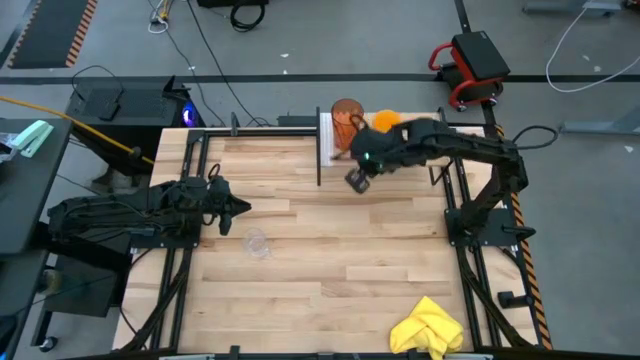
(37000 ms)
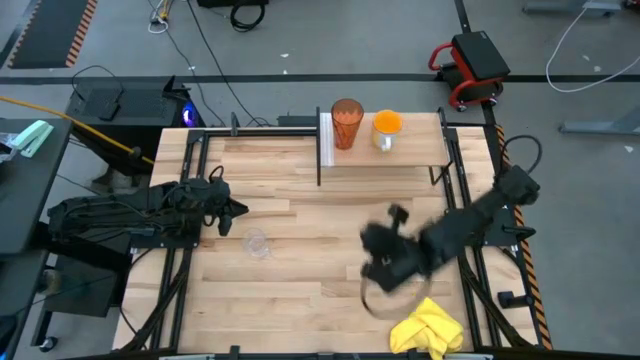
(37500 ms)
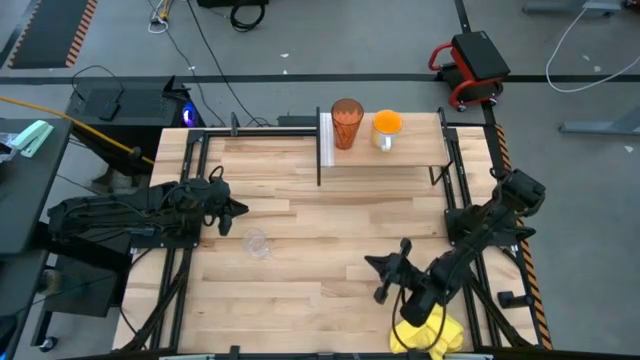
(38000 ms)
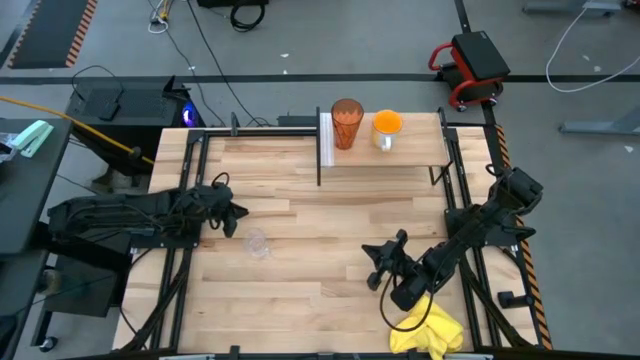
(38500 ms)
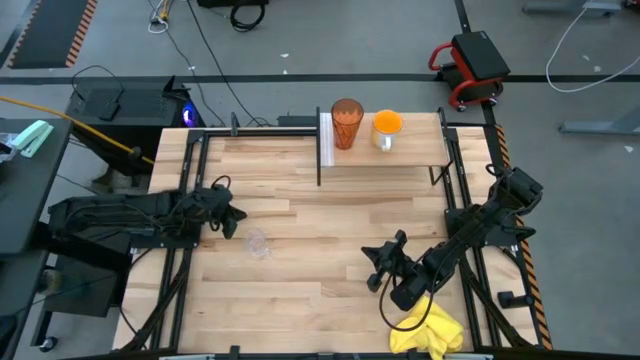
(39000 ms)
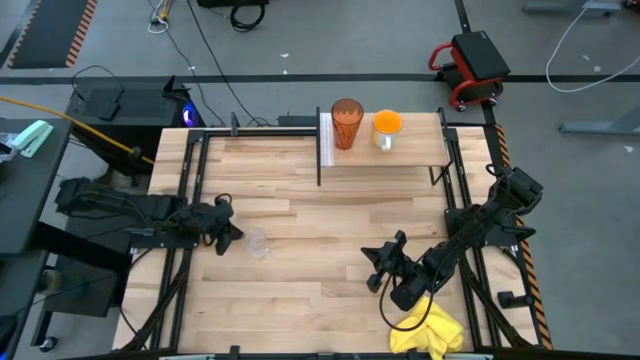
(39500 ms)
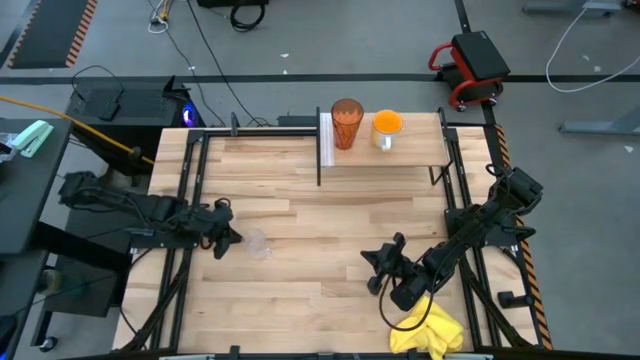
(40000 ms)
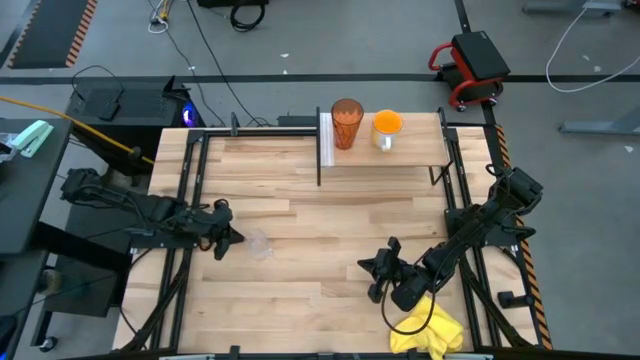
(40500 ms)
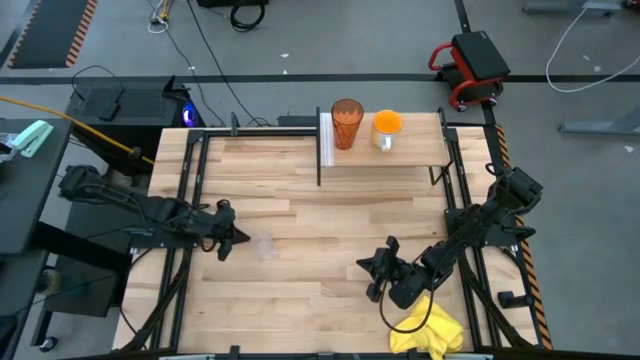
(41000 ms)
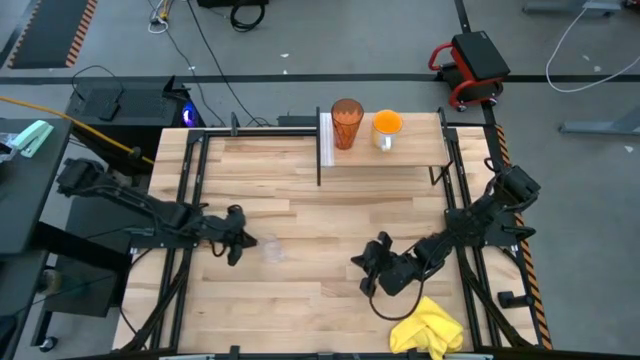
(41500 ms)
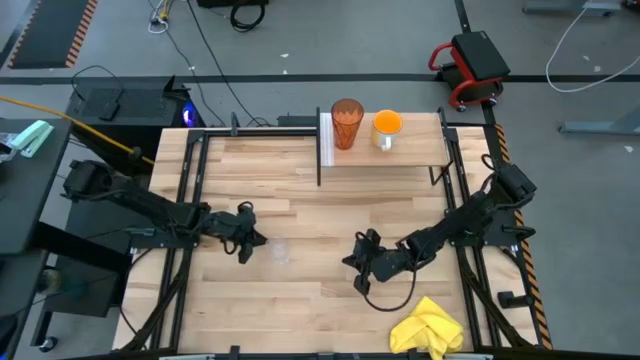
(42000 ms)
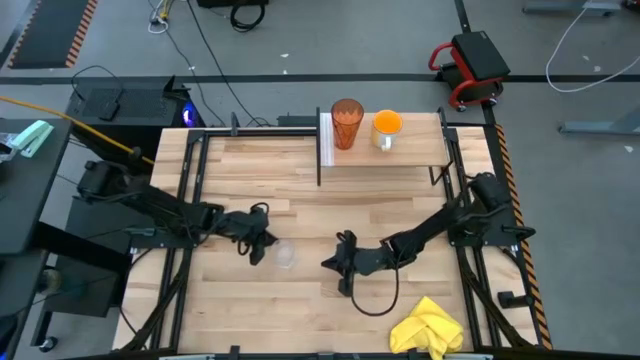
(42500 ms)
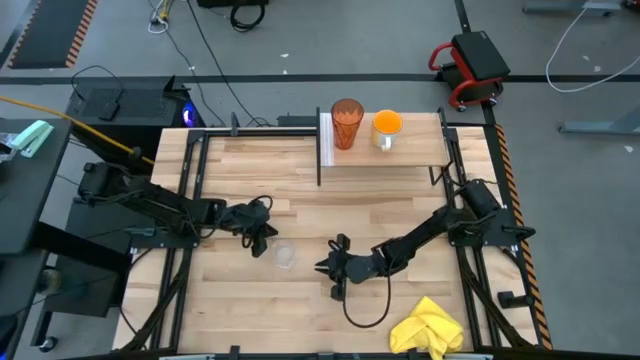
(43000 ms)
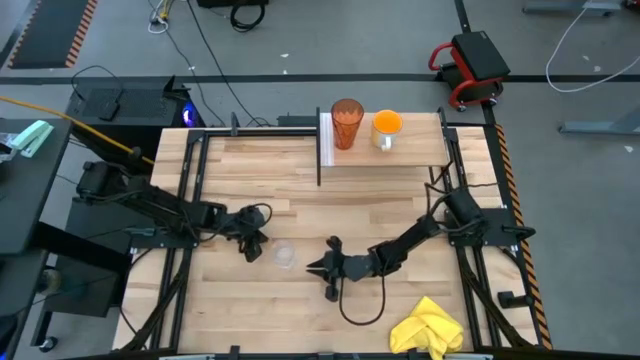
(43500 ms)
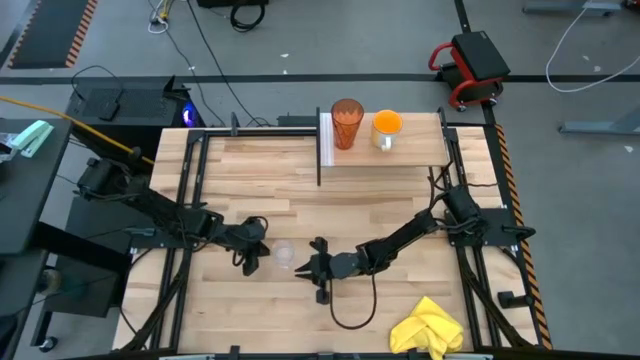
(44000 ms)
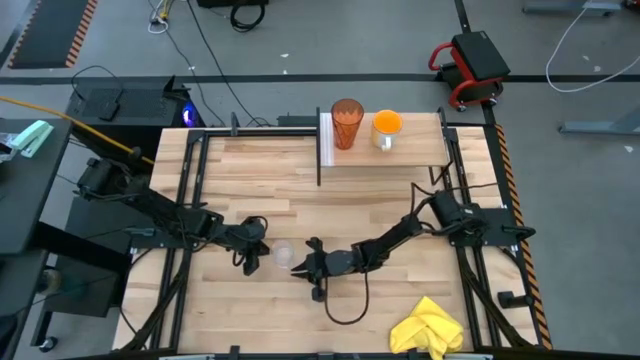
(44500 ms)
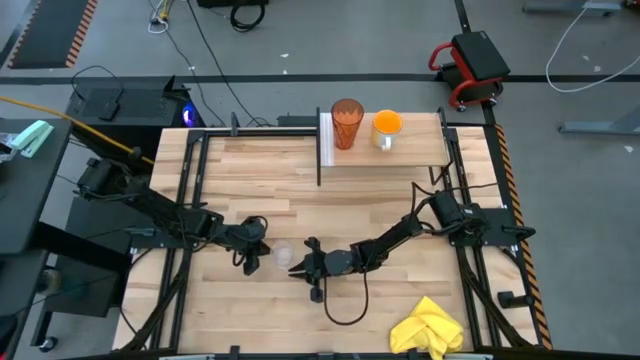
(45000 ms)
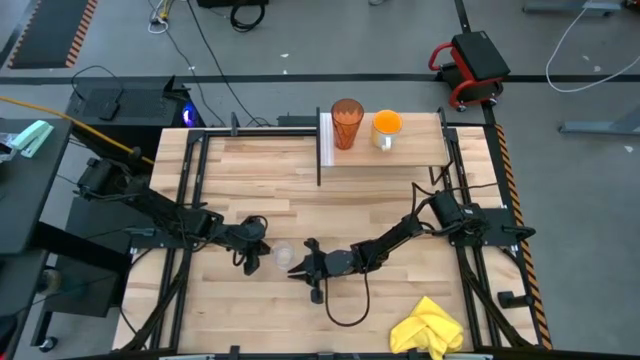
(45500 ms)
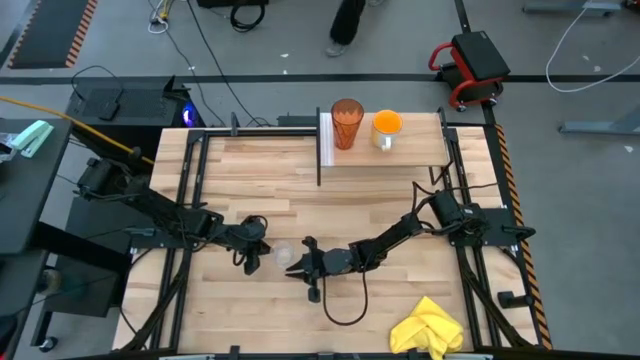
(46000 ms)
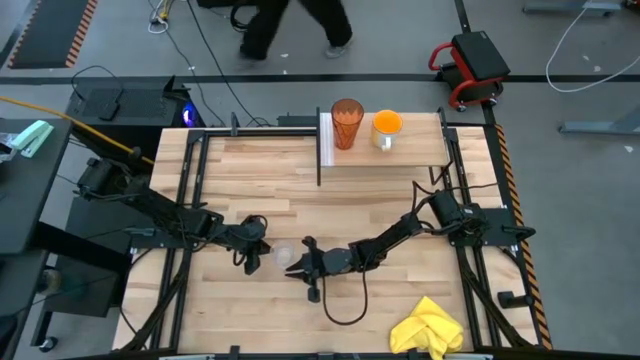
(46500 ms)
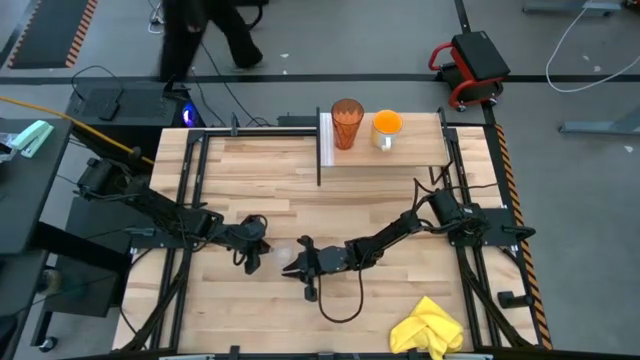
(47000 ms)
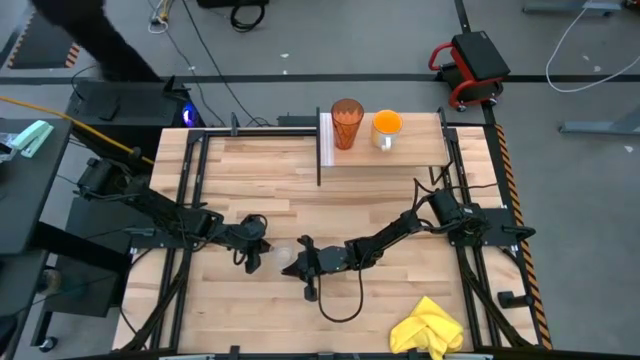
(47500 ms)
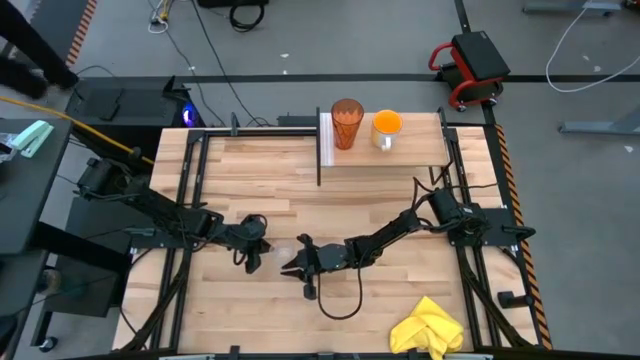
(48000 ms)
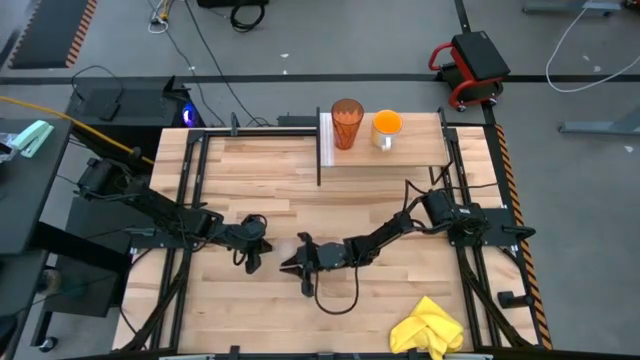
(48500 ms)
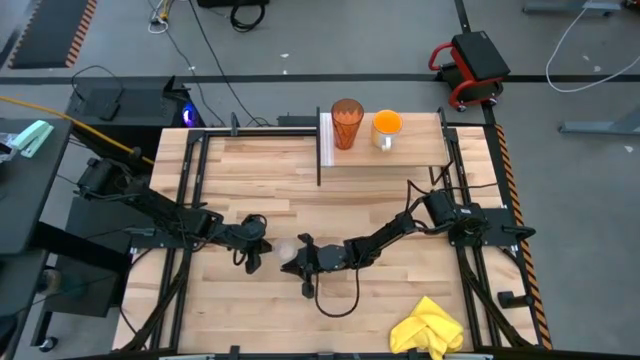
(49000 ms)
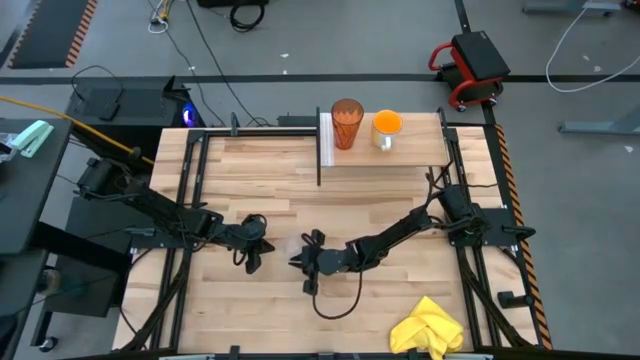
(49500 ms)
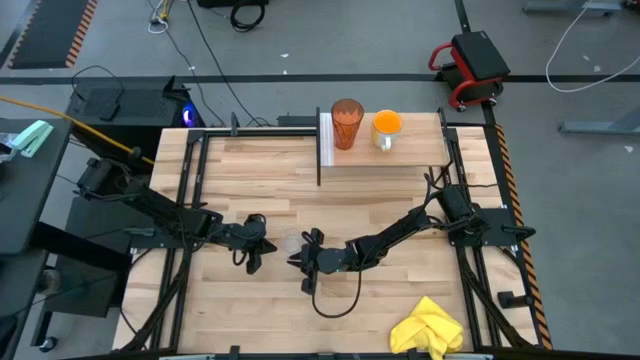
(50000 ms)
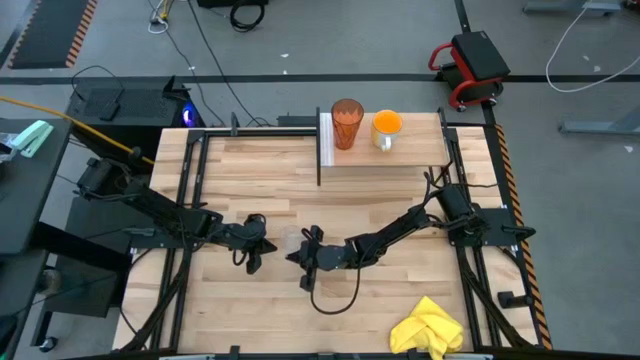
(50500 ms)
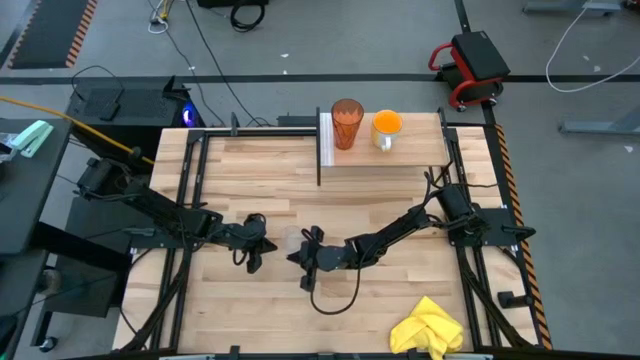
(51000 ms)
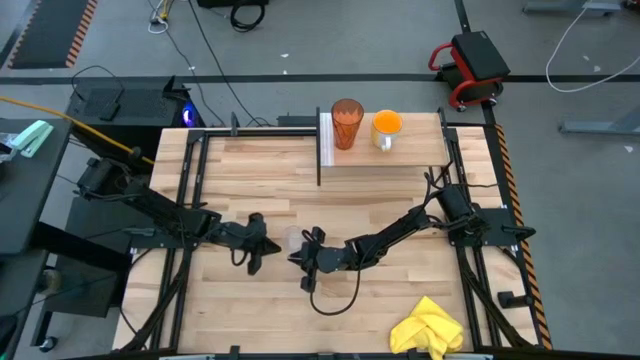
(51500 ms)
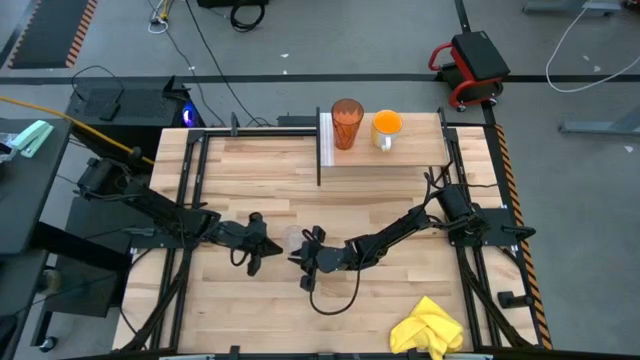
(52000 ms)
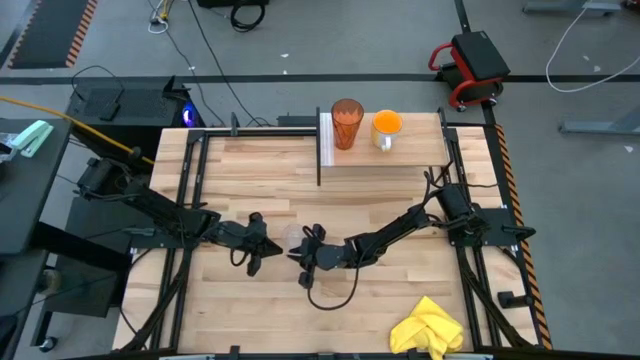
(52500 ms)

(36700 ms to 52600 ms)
Task: Stack small to large cups/mugs on shelf
Put the transparent mug on the shelf

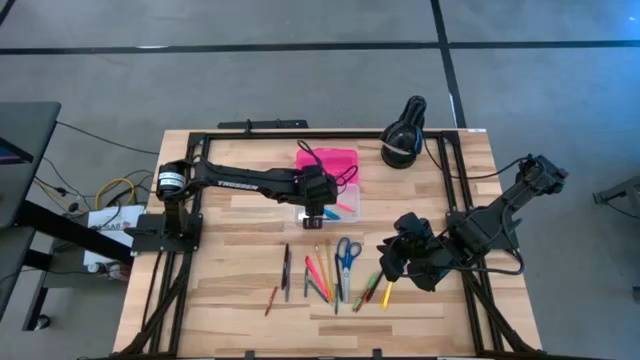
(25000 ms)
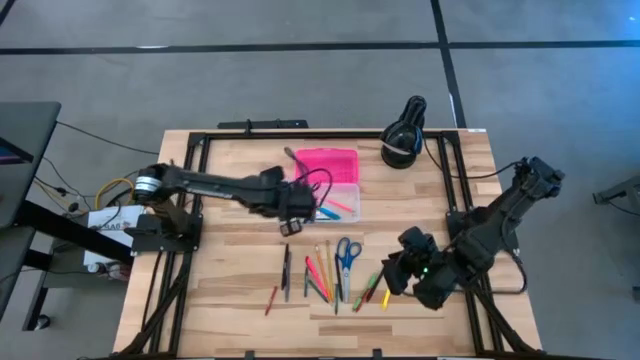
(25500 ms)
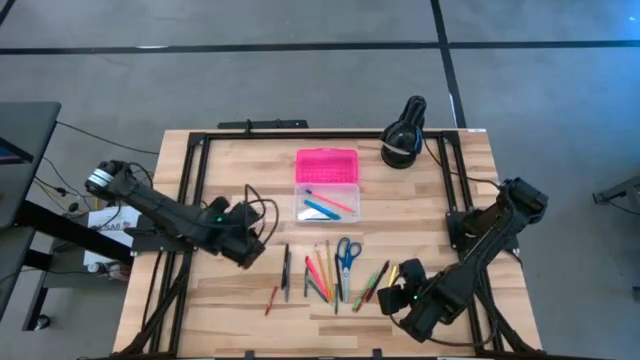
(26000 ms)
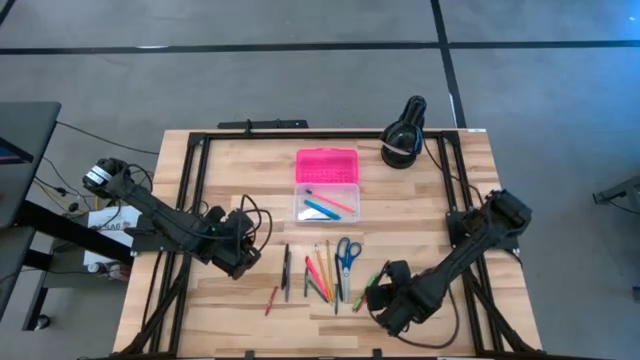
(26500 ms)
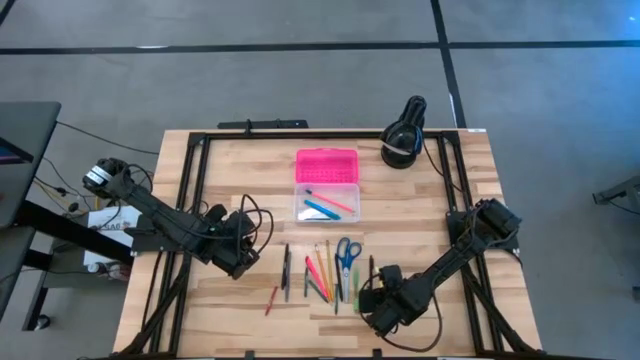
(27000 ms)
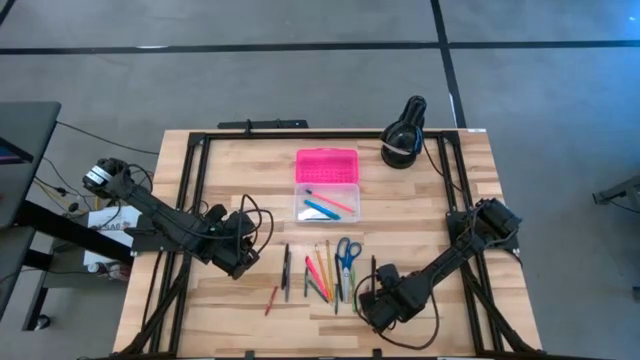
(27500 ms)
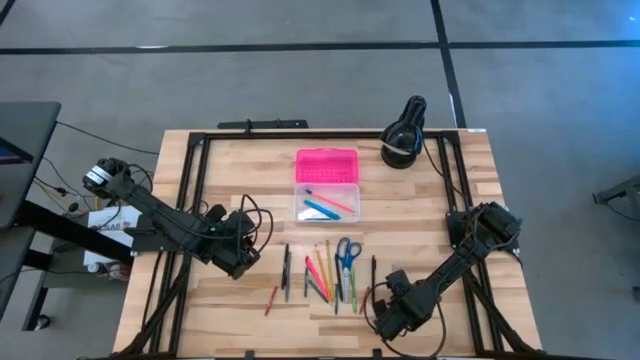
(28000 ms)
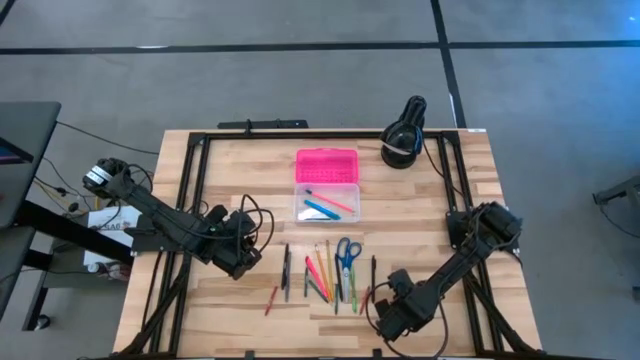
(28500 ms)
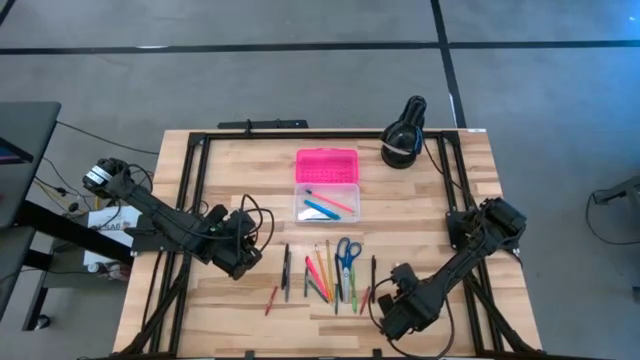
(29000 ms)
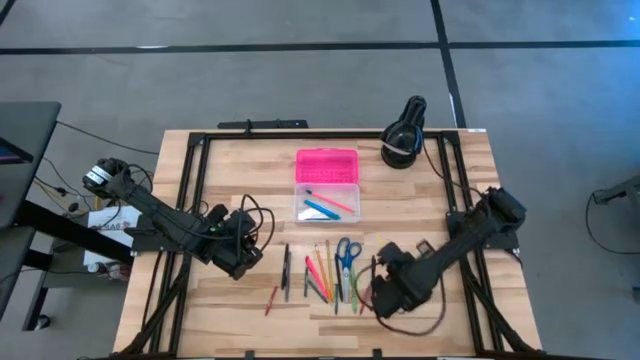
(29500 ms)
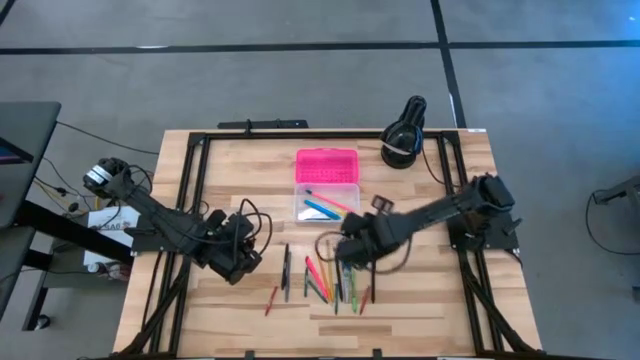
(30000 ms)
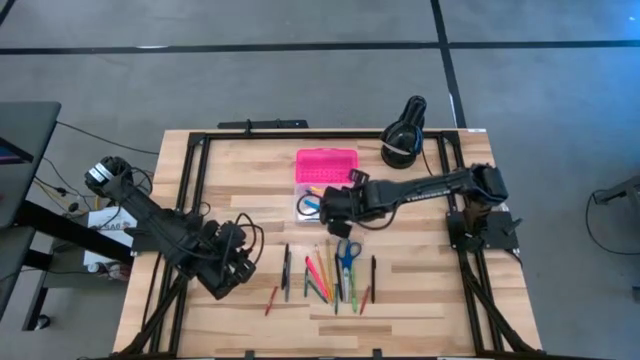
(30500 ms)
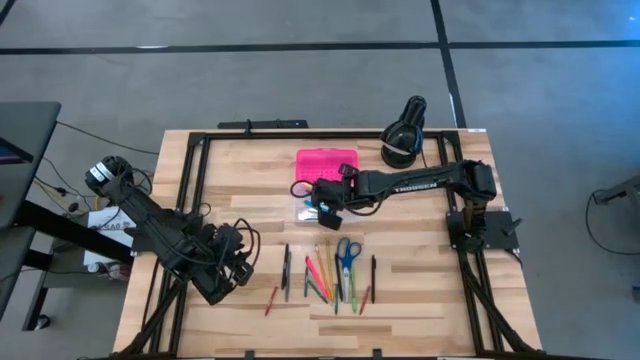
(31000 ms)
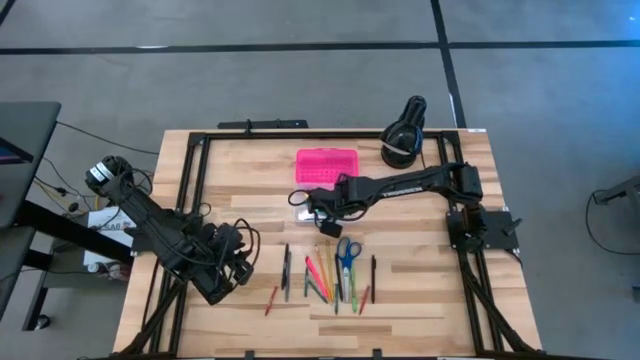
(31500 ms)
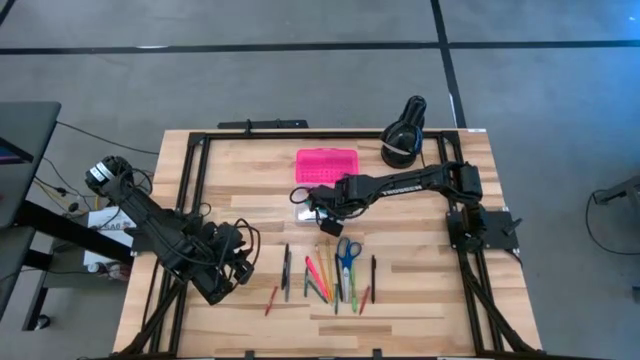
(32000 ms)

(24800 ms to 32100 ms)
Task: Pick & place school supplies into a supply box
Put the yellow pen into the pink supply box
